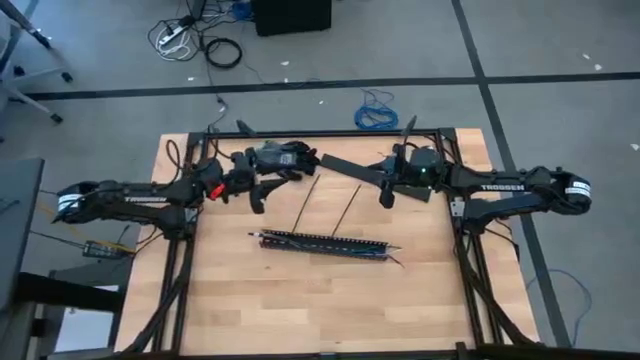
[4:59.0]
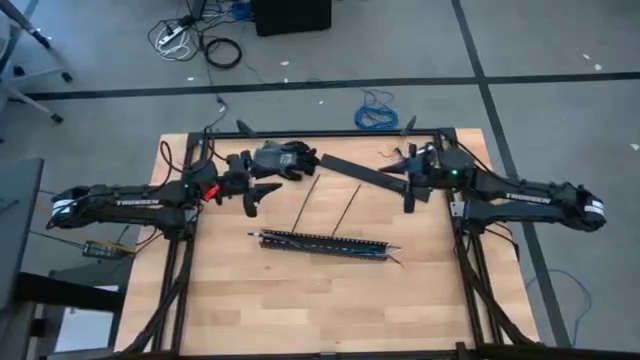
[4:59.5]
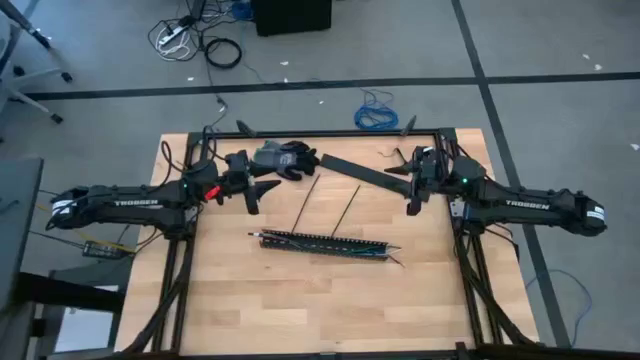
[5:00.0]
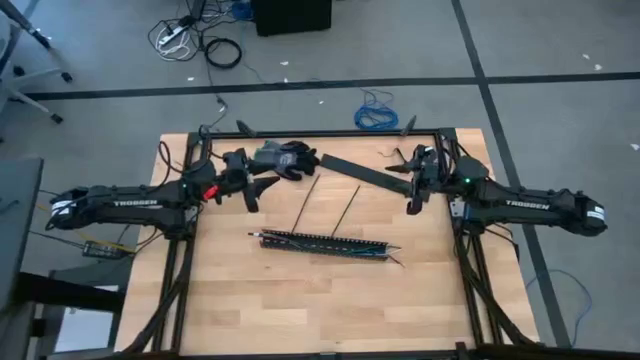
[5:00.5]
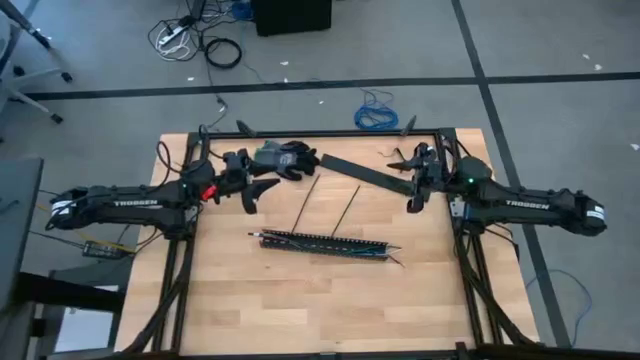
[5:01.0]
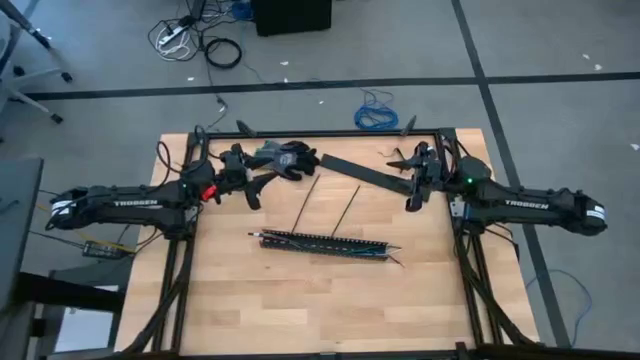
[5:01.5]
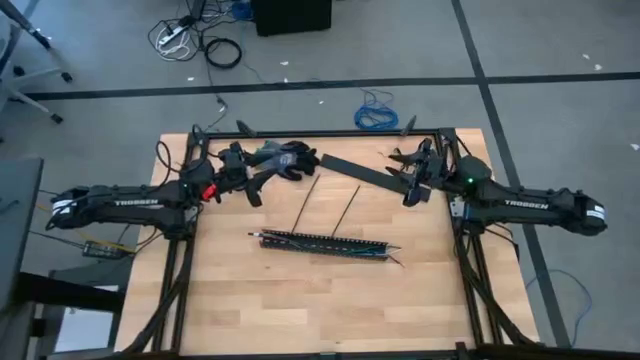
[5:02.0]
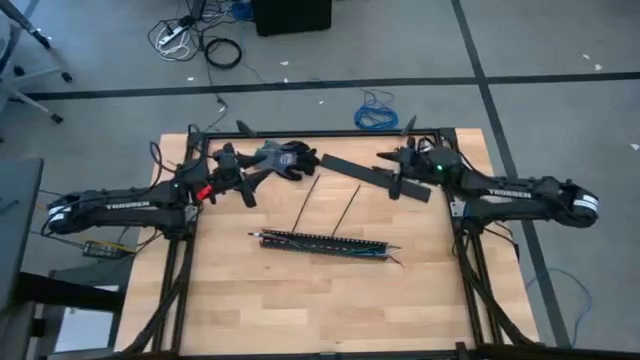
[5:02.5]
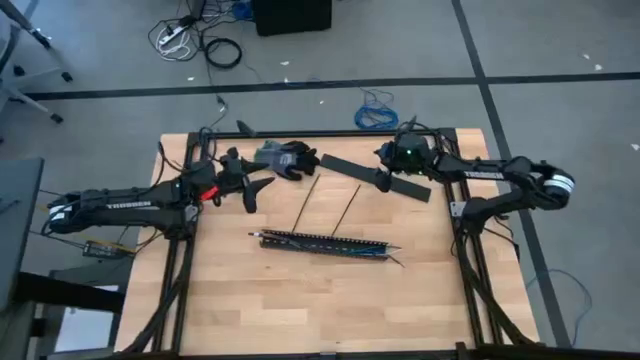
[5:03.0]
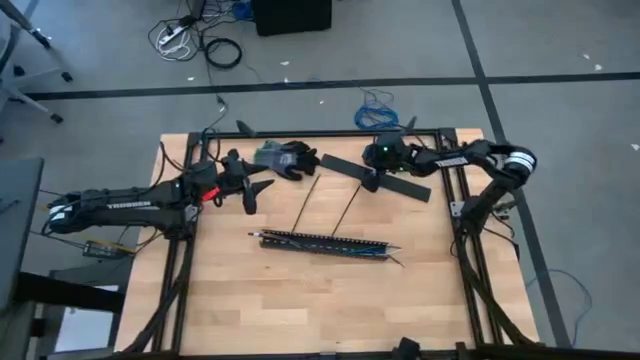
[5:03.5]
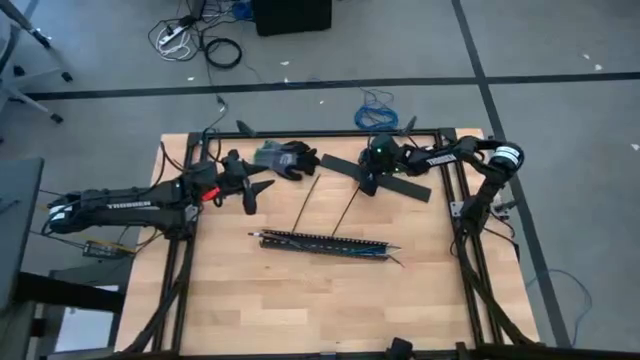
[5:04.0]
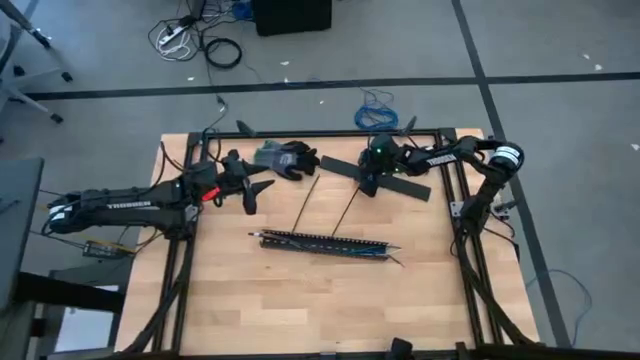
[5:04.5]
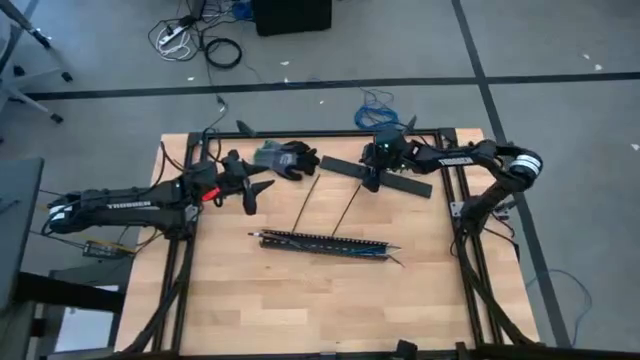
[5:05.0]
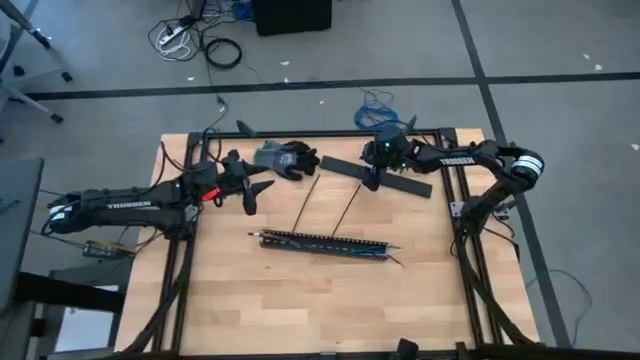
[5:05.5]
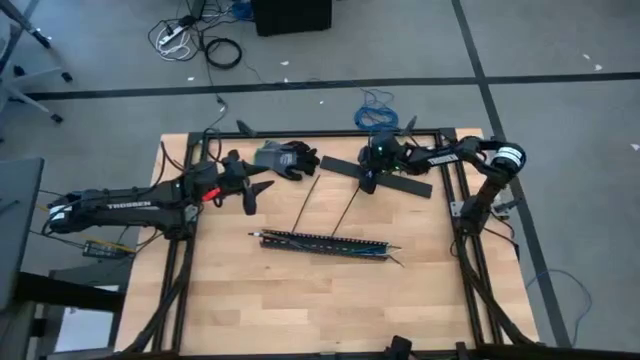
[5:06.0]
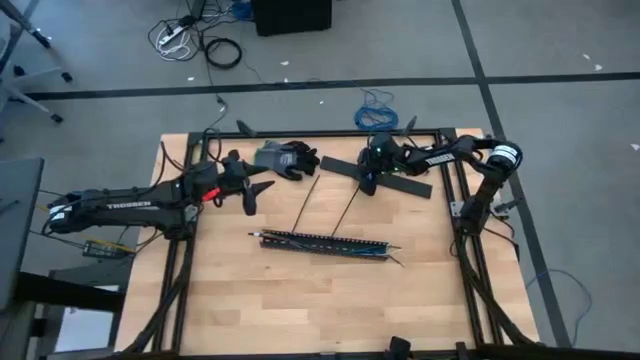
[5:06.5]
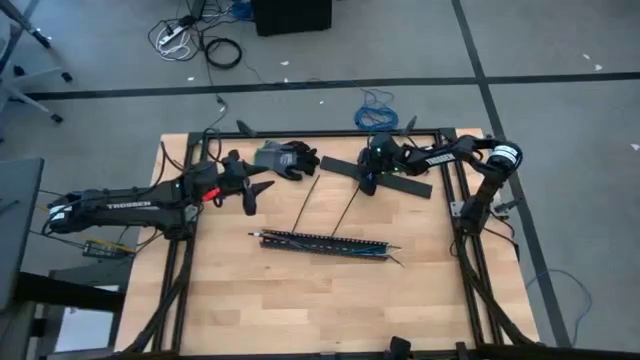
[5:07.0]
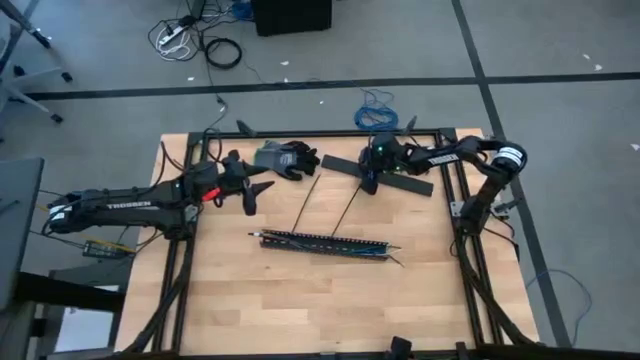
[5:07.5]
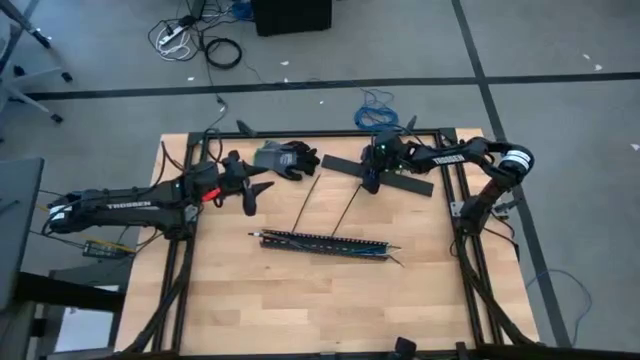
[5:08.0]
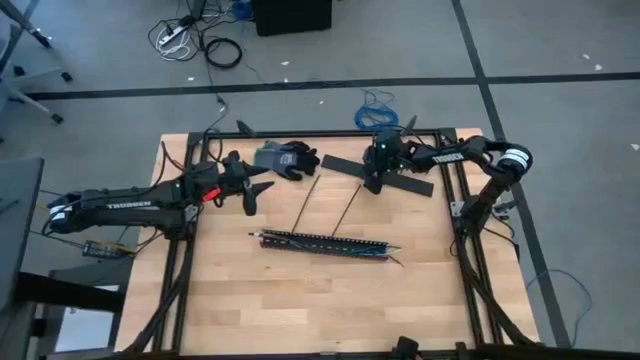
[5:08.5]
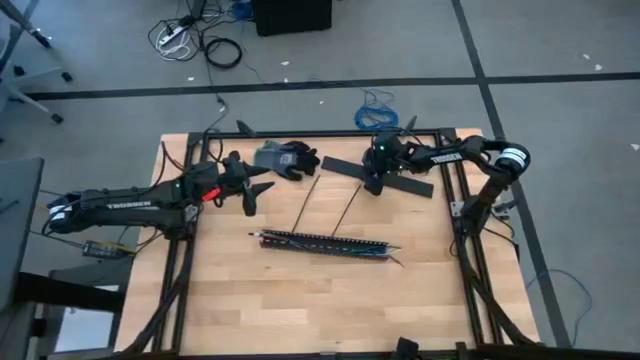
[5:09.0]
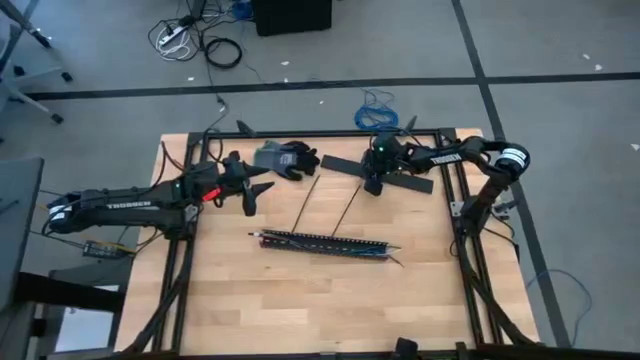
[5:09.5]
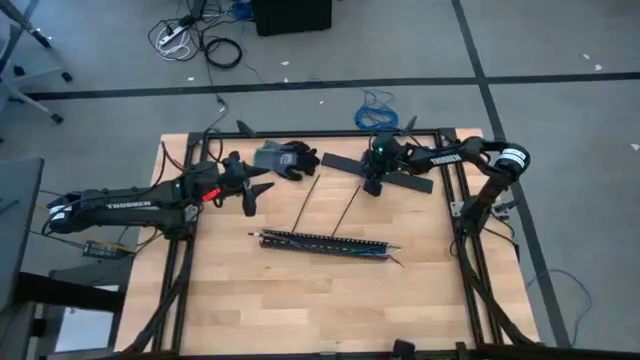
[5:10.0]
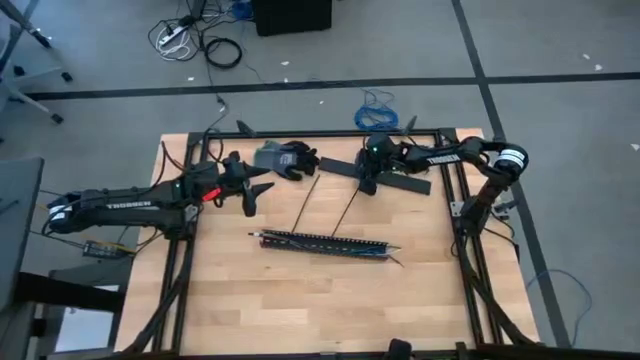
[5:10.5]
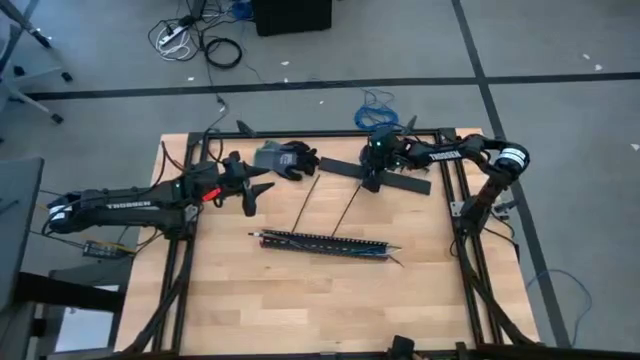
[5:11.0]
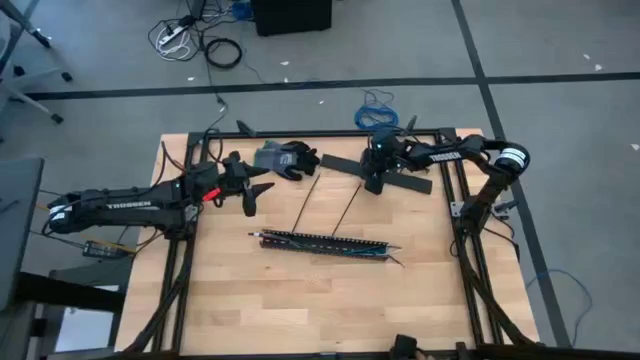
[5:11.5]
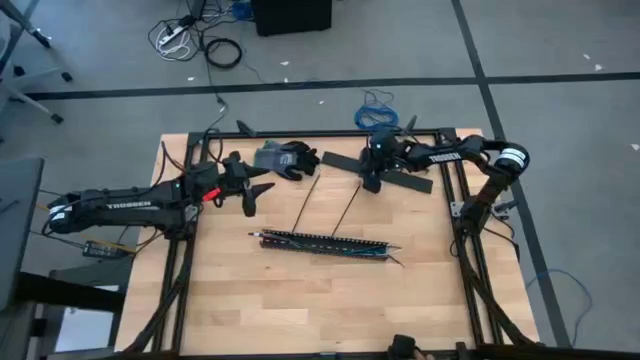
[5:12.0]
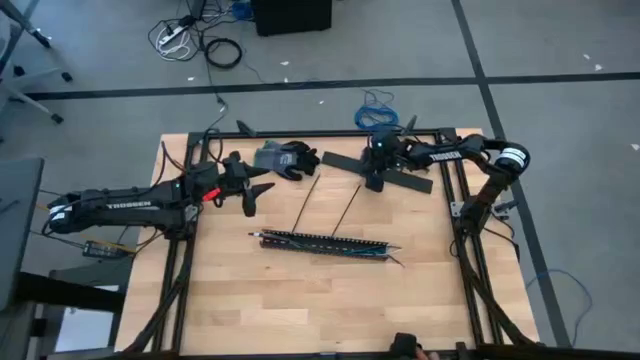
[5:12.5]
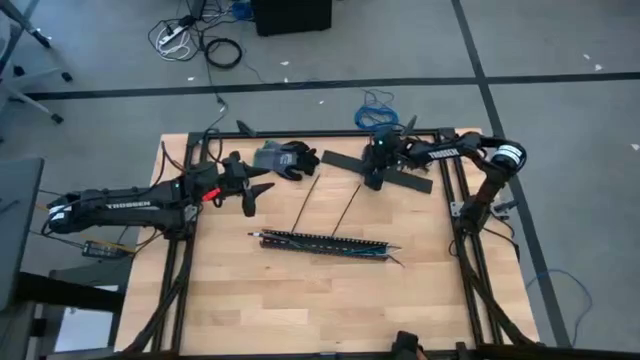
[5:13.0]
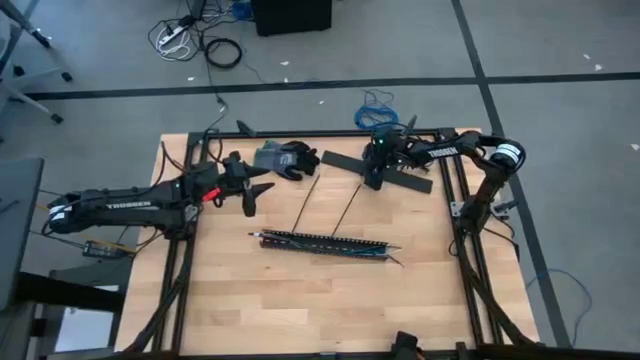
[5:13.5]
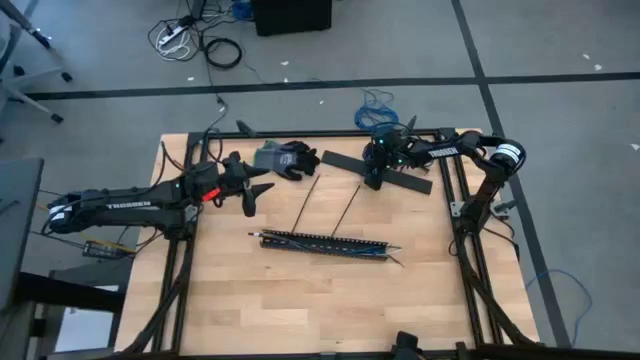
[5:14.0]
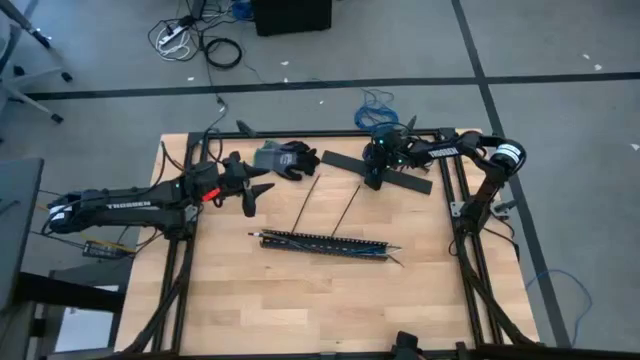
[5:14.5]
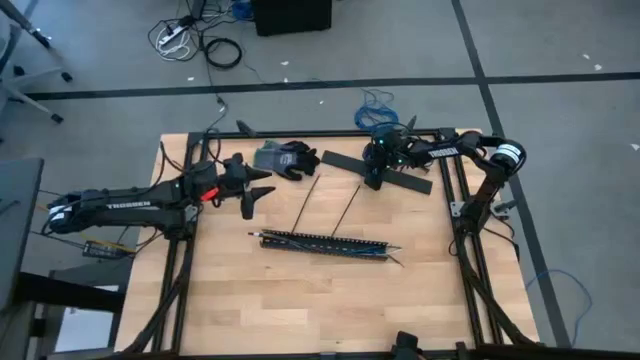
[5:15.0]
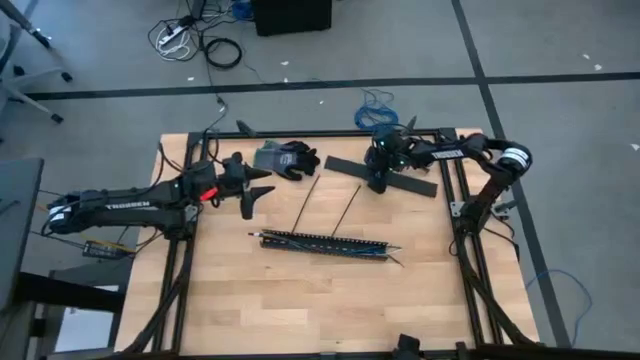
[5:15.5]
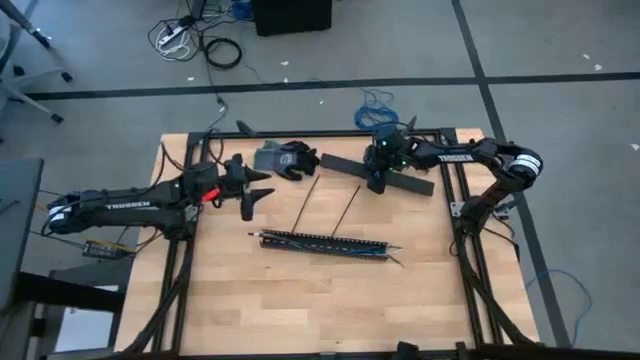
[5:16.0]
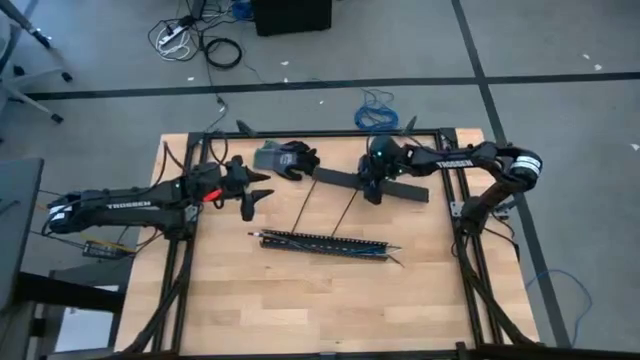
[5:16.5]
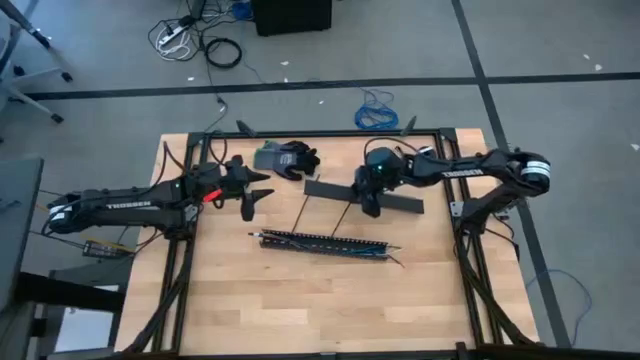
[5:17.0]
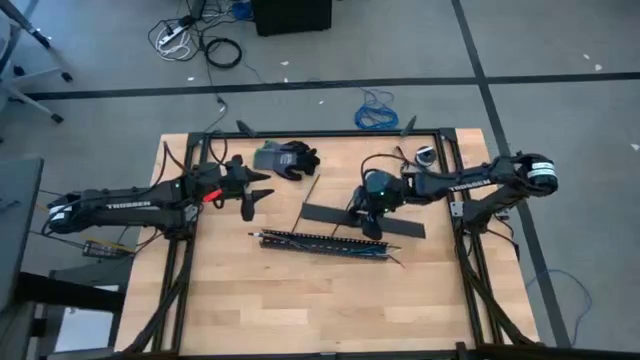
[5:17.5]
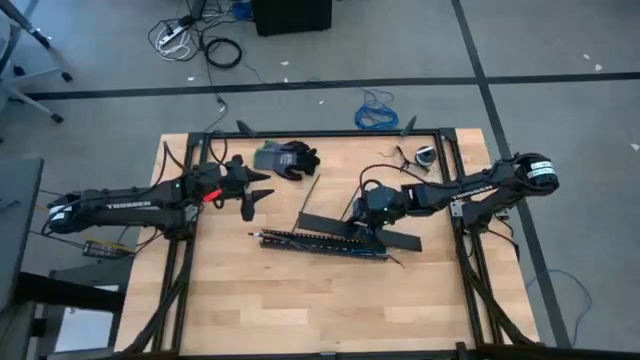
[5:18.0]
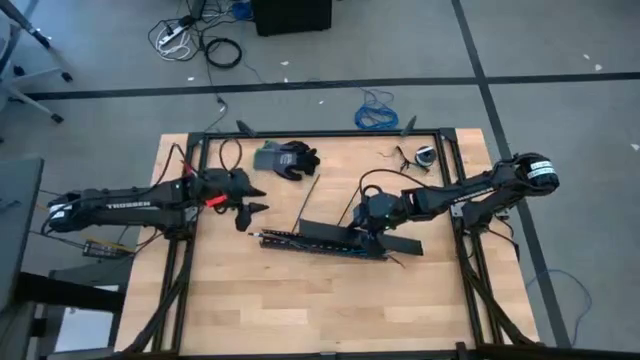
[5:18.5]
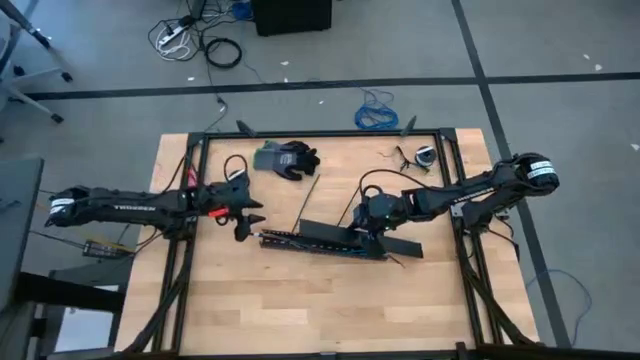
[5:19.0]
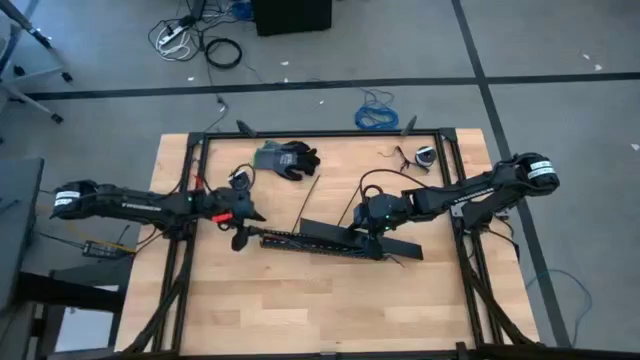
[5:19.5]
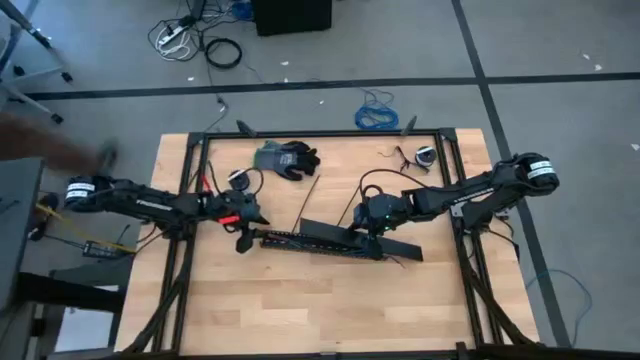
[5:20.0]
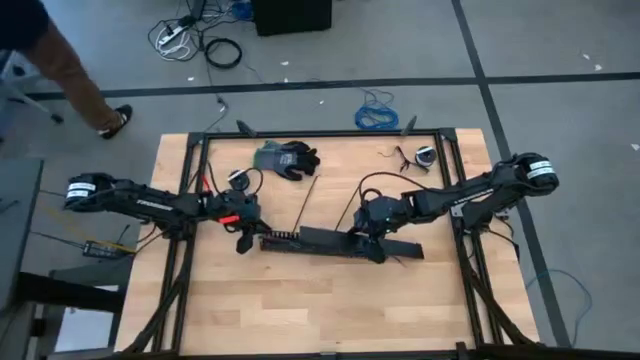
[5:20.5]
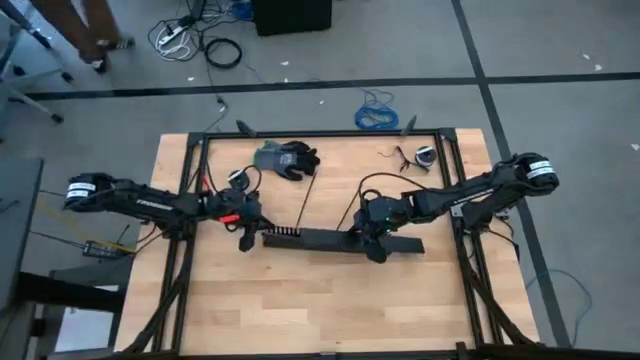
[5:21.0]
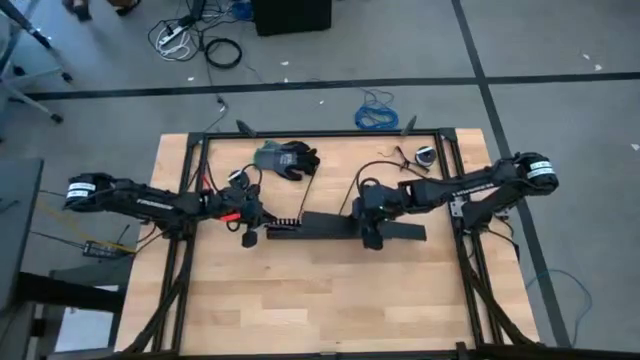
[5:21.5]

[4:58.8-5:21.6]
Task: Ziptie cables
Close the black cable duct cover
